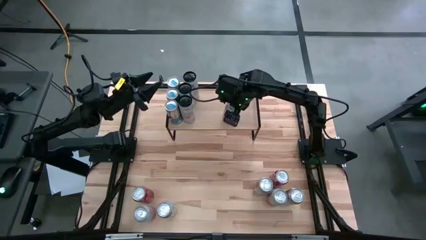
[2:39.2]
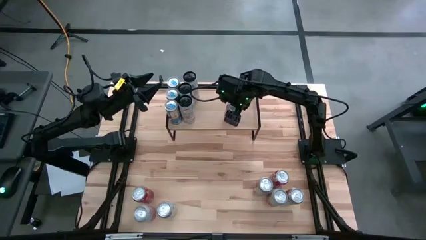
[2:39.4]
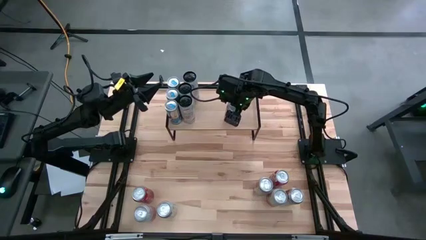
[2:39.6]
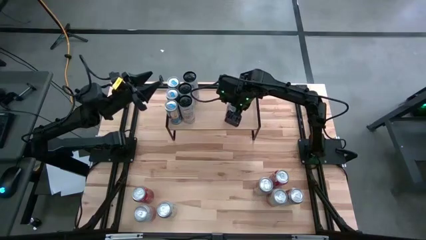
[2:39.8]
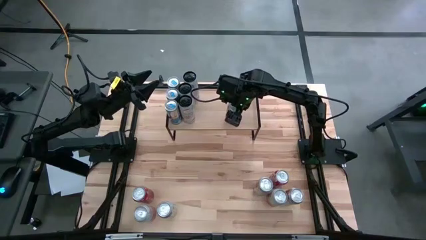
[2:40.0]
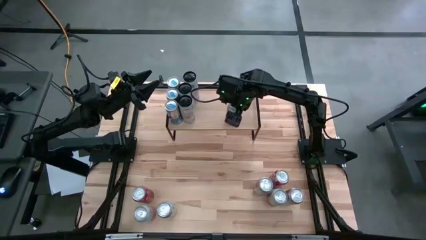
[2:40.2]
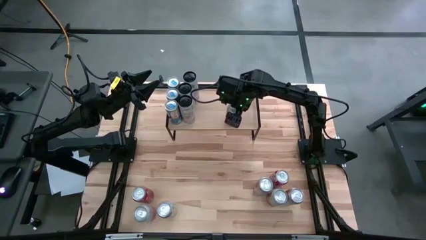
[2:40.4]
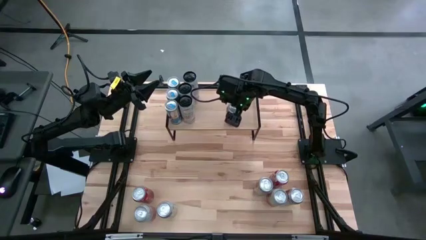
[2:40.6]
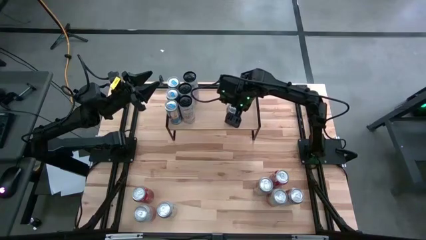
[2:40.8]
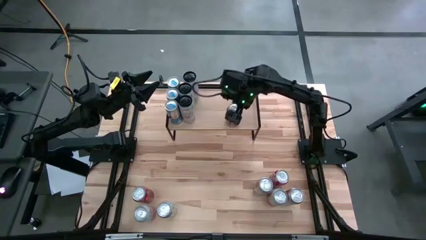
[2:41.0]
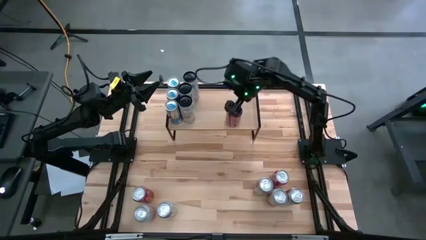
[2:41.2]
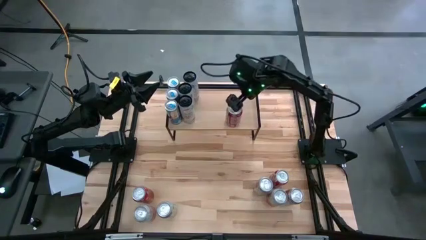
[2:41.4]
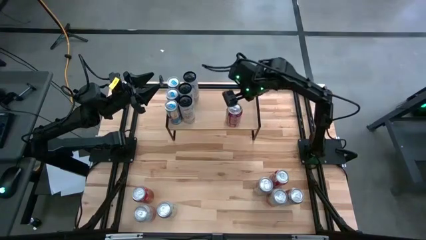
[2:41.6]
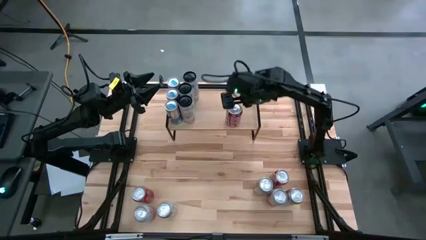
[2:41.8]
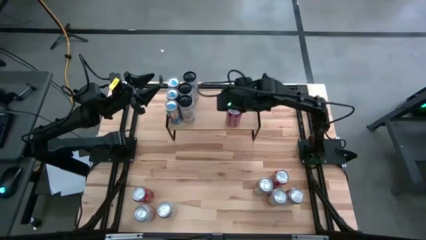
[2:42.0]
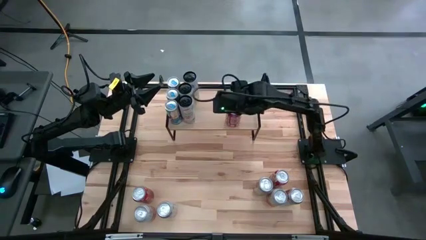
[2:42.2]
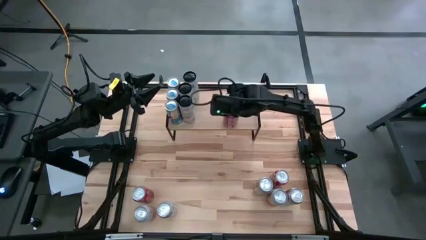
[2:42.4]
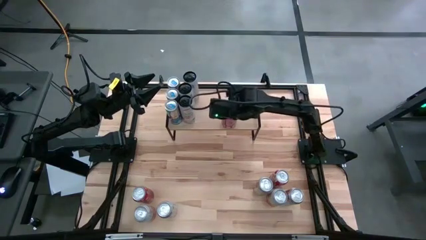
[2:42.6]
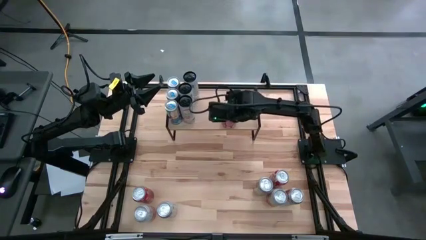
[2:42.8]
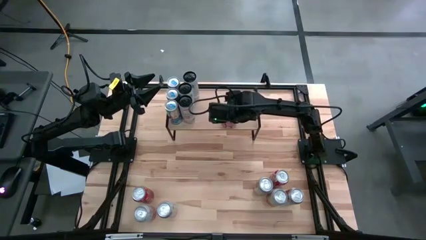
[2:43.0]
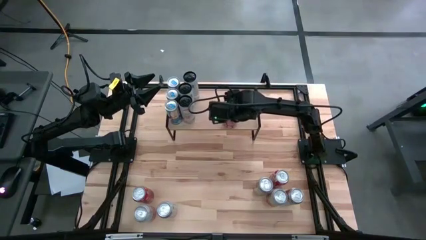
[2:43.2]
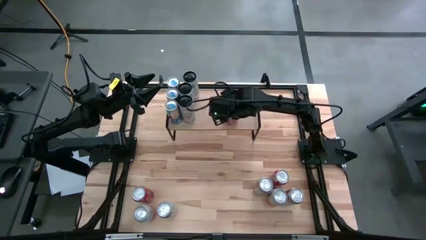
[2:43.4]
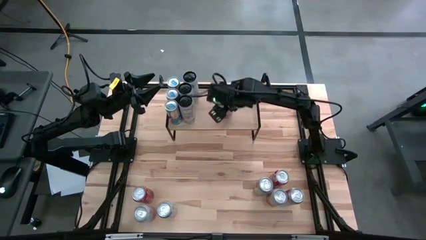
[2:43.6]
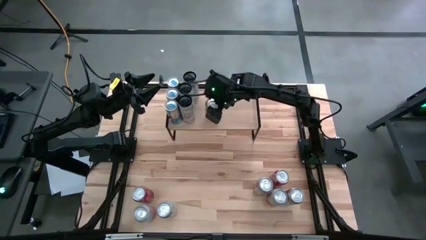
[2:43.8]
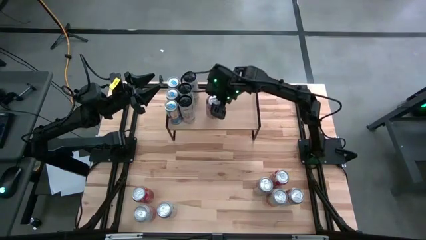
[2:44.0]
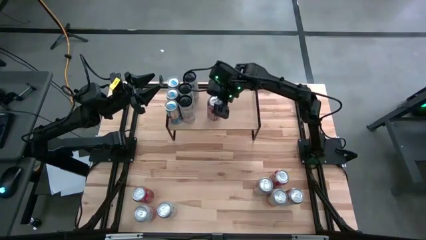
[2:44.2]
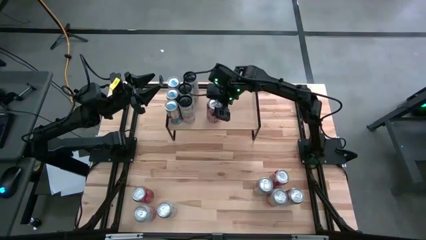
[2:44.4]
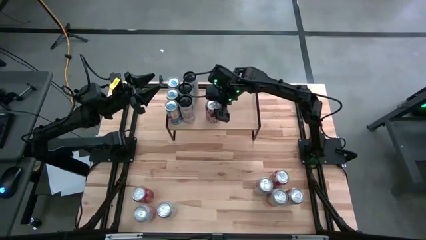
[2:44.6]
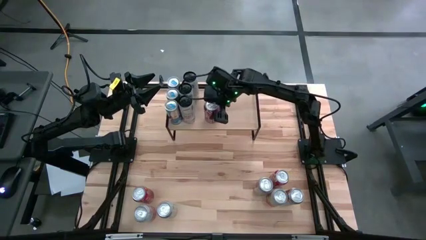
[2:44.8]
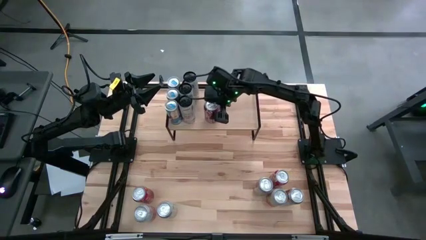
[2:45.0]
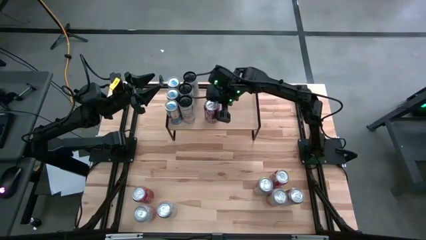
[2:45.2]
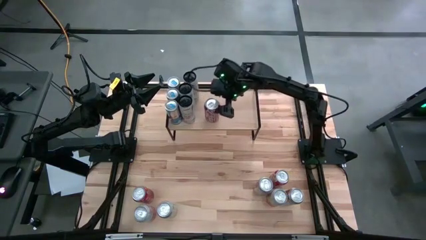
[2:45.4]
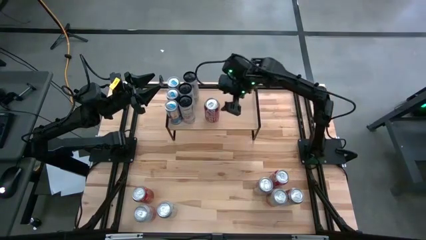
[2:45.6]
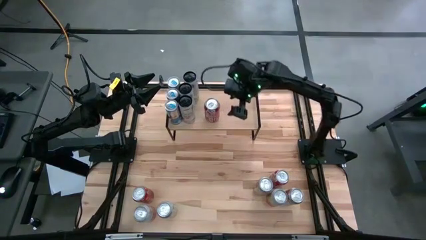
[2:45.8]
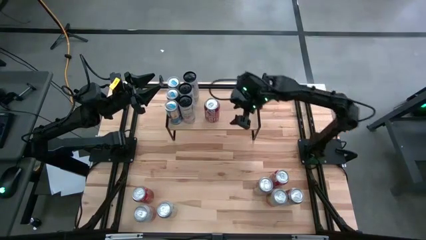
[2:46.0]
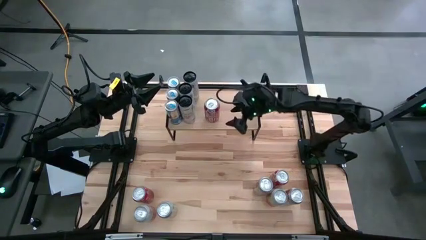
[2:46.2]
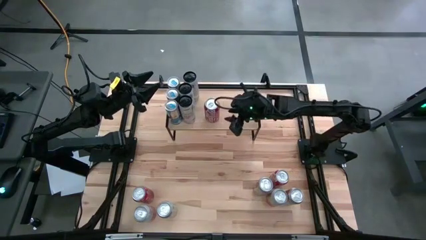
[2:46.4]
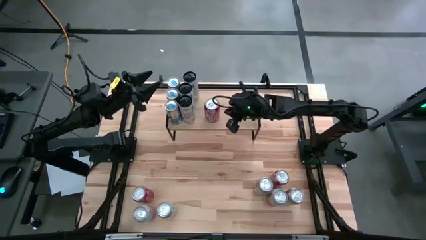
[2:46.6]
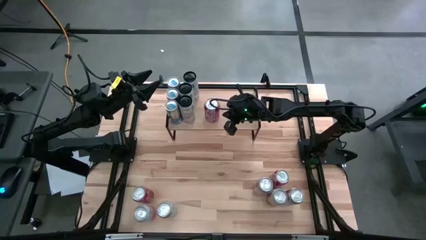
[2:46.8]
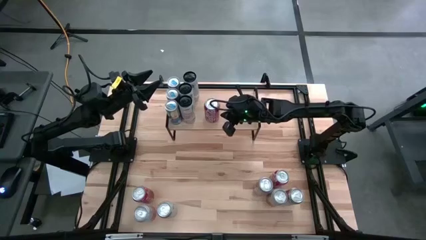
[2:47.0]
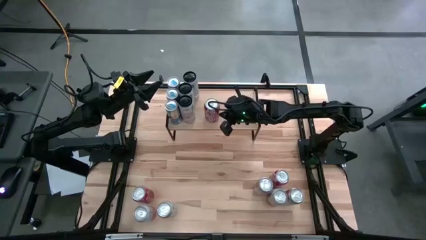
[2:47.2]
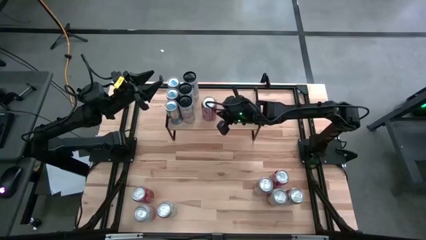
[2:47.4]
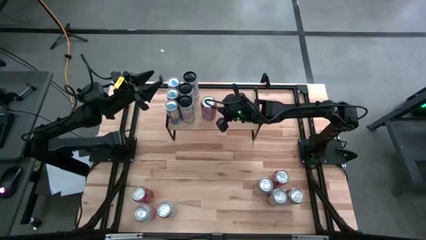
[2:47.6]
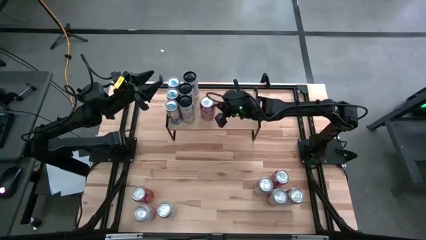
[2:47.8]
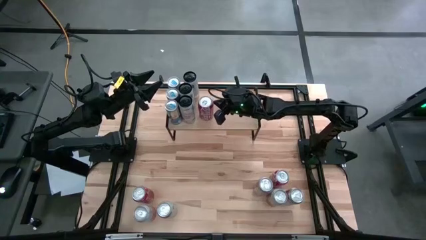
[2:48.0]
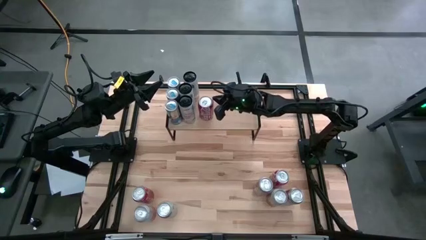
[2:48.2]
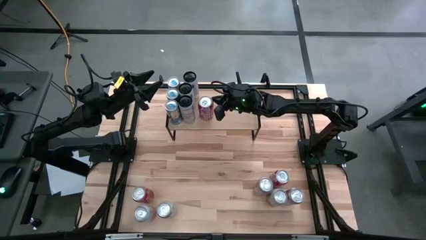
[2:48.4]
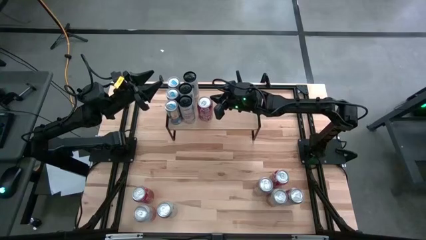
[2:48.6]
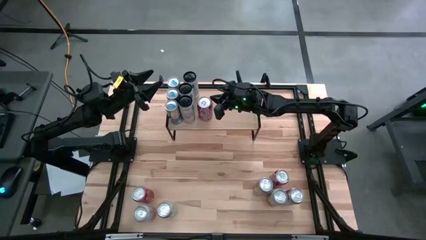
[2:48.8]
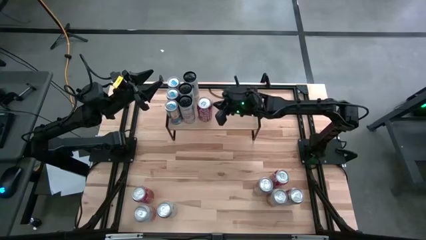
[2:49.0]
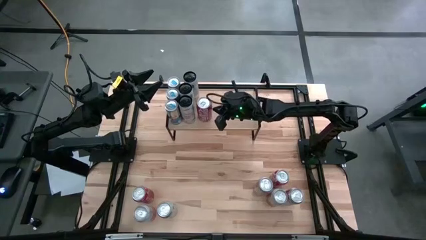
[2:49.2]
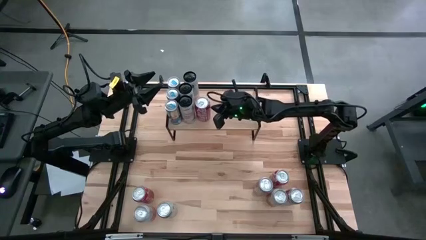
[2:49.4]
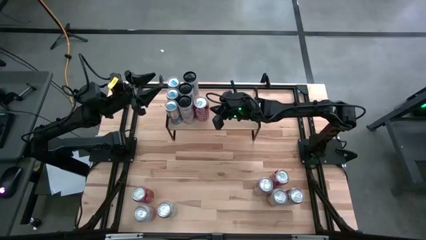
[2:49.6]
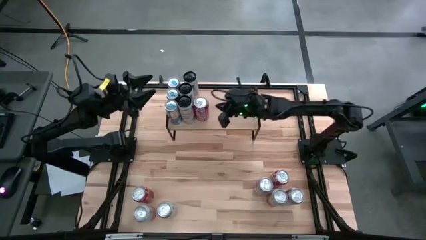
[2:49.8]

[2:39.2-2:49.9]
Task: Place canned beverage on shelf
Put the top red-white soda can on the shelf

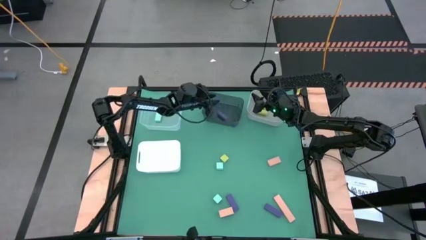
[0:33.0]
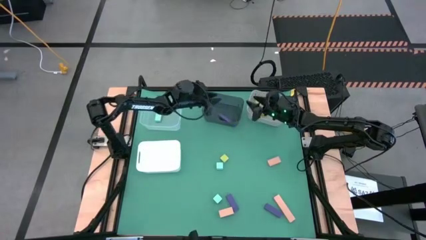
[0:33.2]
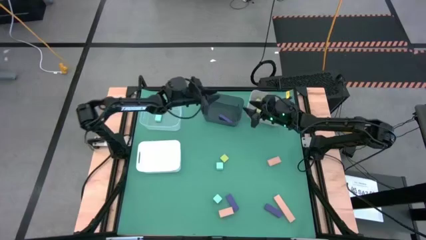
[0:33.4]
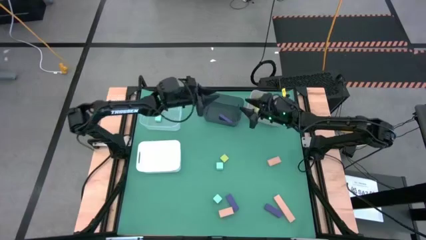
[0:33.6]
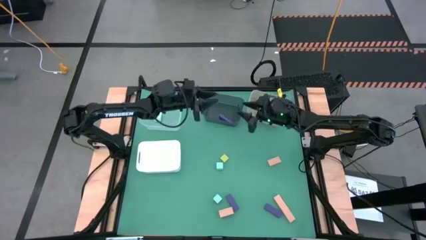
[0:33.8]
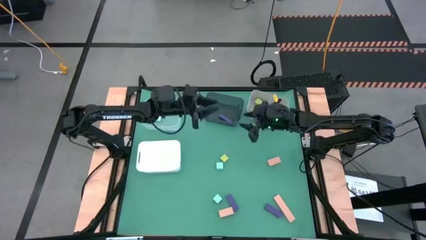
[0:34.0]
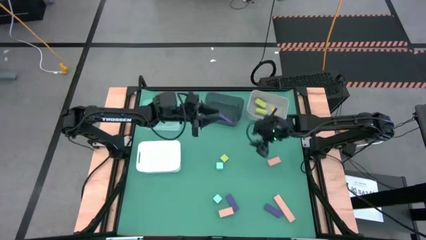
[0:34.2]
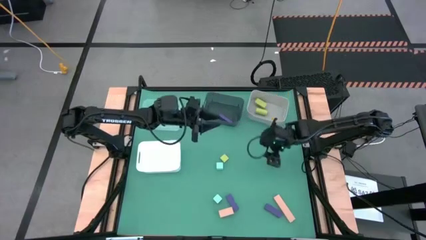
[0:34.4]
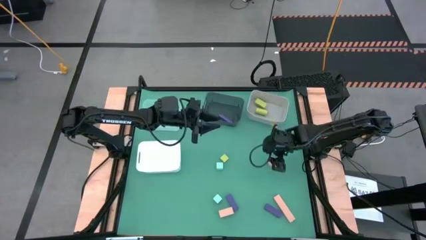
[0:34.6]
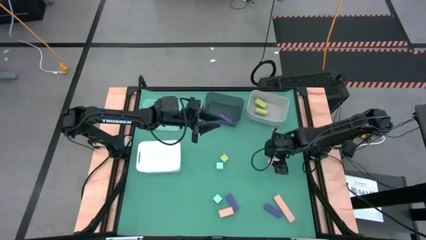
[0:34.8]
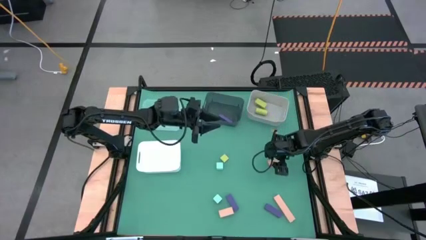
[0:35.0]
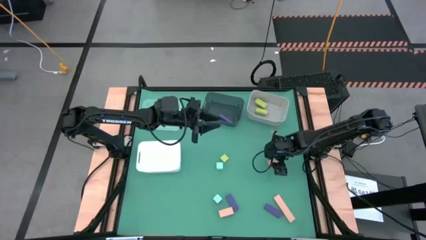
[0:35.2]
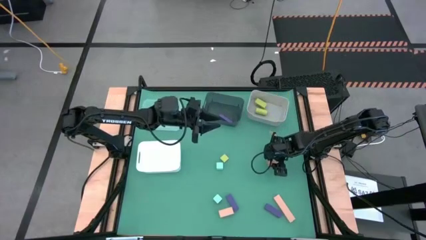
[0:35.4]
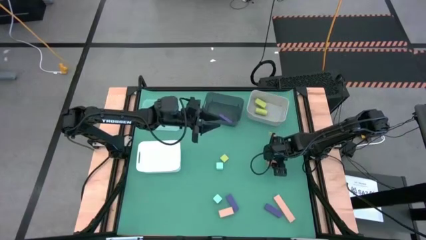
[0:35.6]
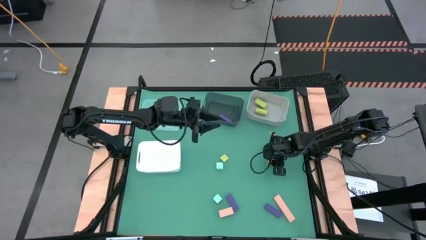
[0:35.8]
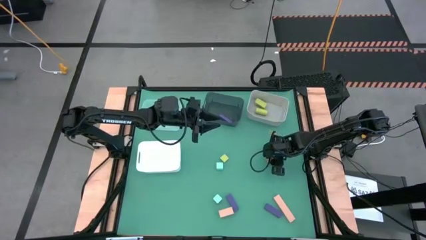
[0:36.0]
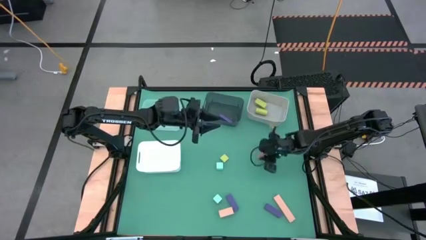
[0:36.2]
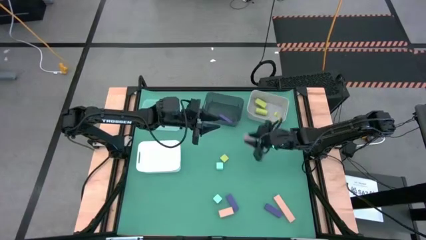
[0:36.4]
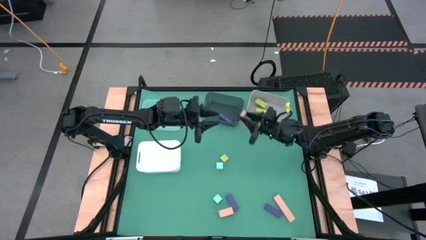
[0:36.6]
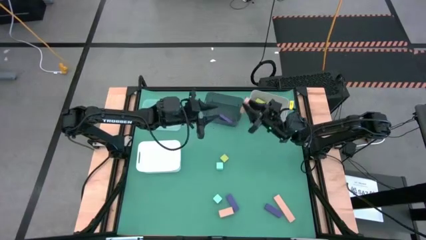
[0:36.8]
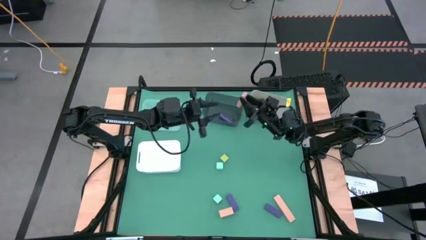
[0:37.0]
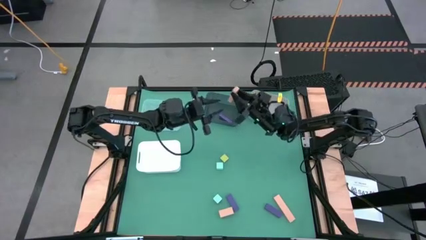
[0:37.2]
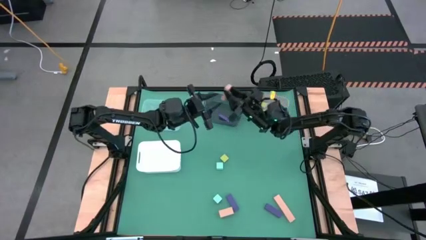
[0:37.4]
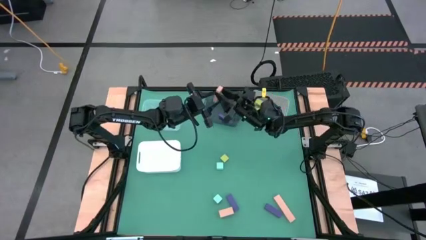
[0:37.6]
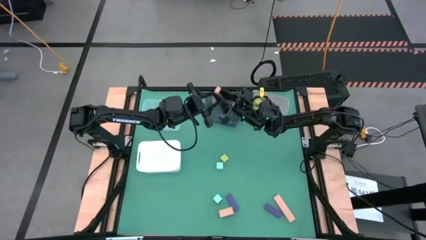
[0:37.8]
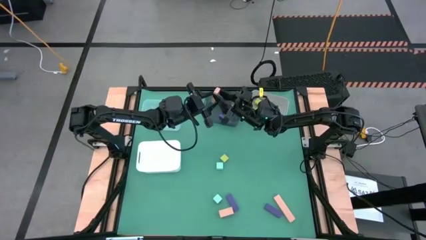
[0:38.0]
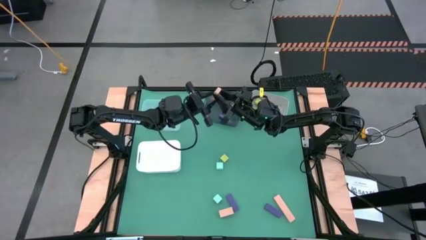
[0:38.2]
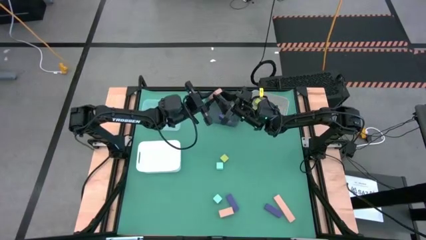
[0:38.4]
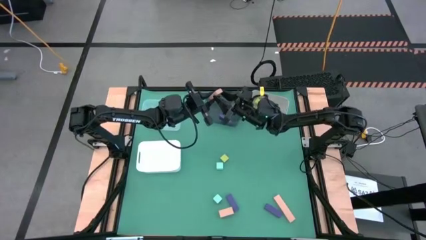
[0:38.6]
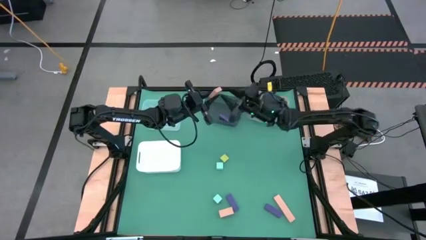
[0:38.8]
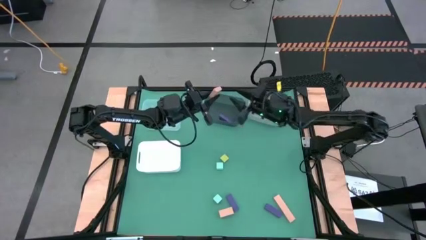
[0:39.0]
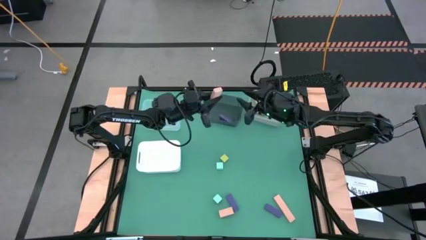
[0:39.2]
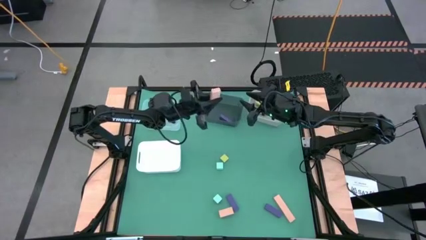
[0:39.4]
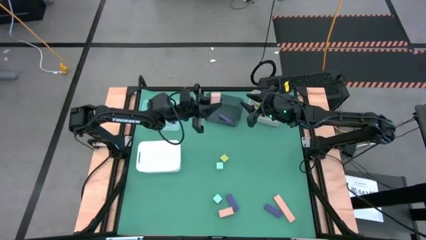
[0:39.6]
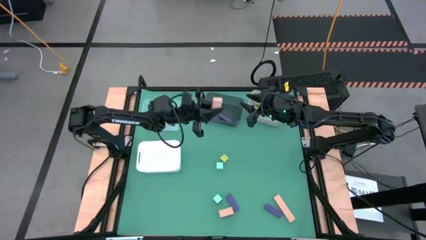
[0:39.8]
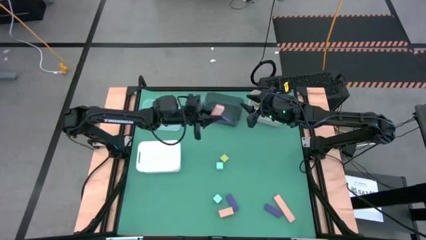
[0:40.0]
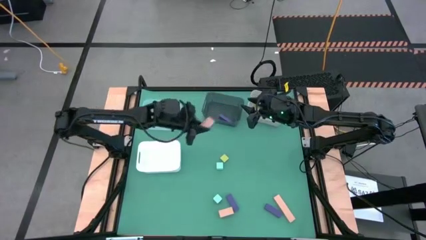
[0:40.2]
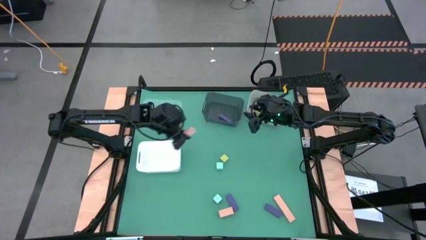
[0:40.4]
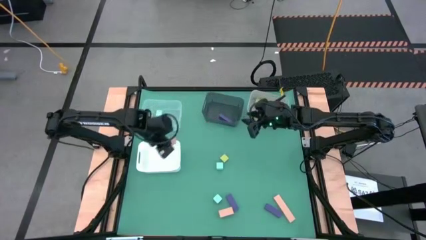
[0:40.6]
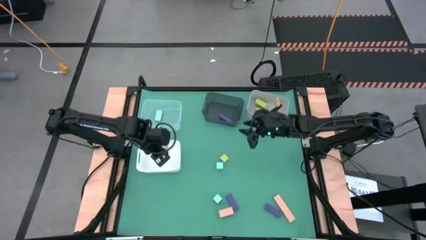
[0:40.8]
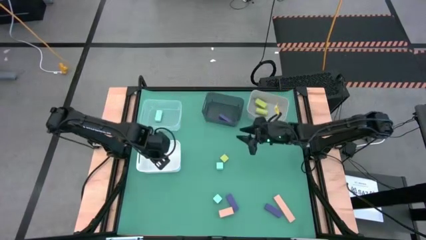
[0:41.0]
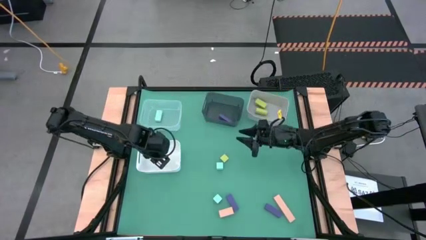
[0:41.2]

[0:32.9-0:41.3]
Task: Sort & place blocks by color
Put the top left brown block into the white bin
